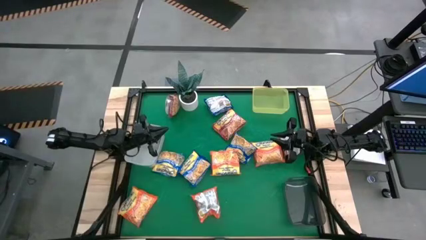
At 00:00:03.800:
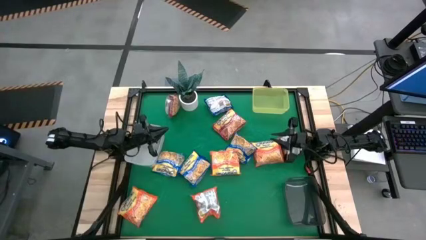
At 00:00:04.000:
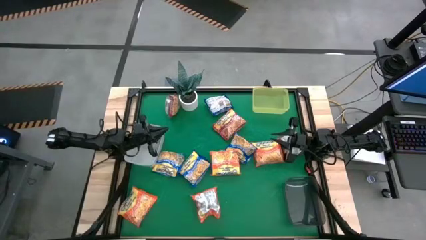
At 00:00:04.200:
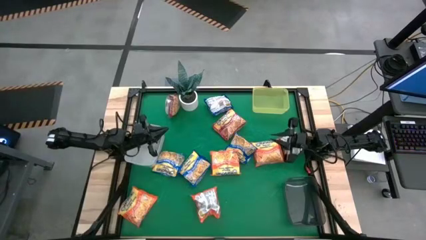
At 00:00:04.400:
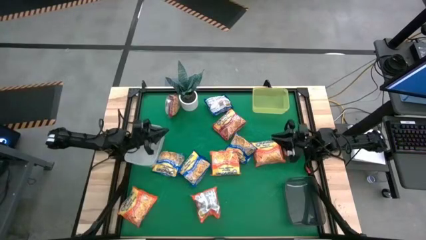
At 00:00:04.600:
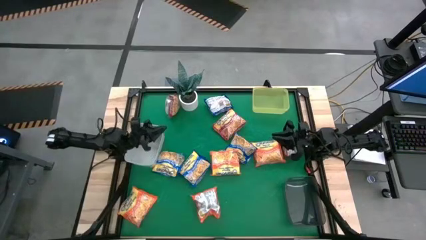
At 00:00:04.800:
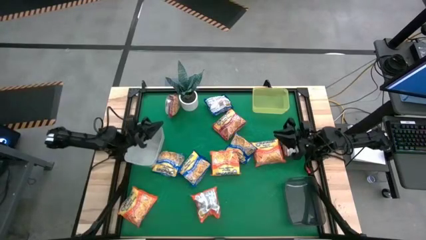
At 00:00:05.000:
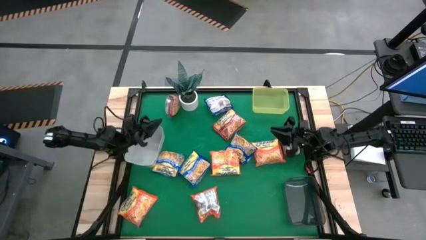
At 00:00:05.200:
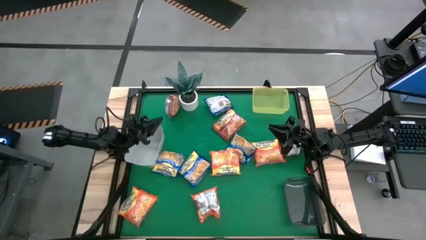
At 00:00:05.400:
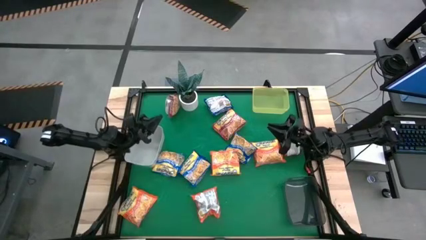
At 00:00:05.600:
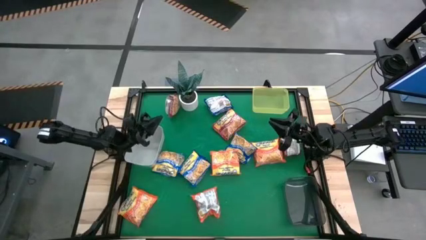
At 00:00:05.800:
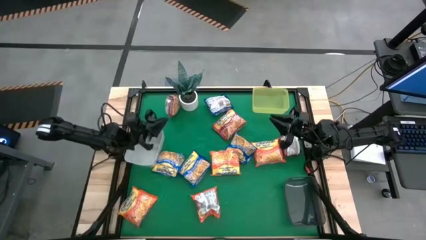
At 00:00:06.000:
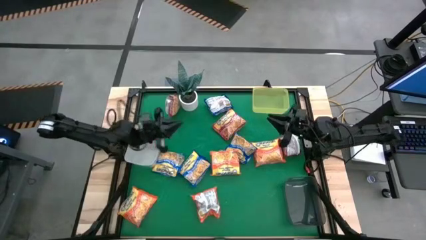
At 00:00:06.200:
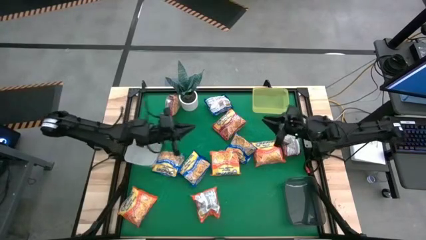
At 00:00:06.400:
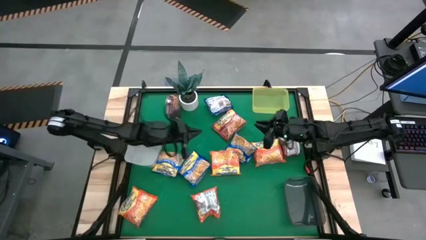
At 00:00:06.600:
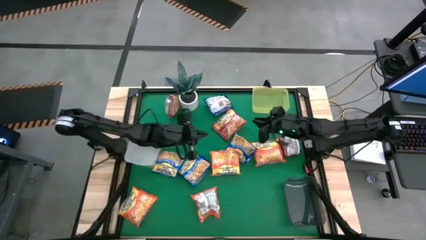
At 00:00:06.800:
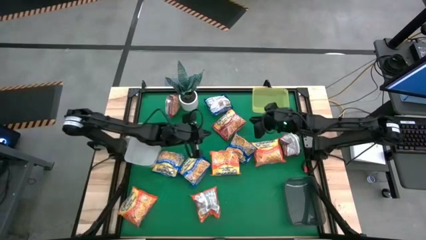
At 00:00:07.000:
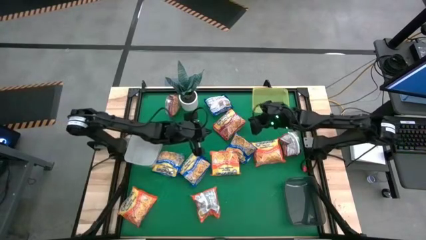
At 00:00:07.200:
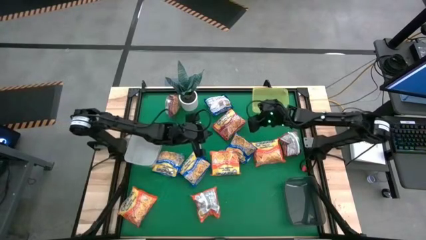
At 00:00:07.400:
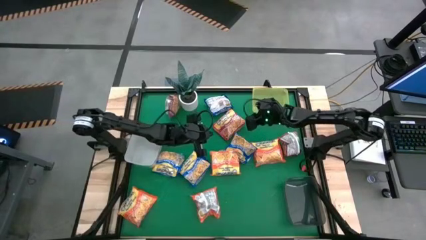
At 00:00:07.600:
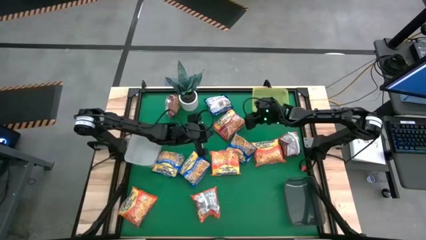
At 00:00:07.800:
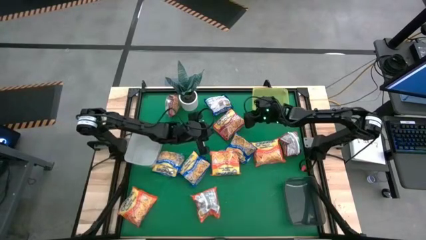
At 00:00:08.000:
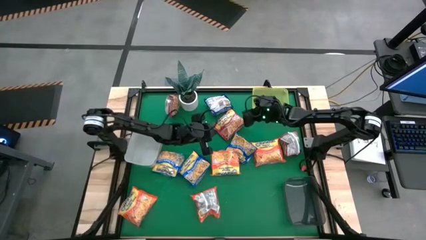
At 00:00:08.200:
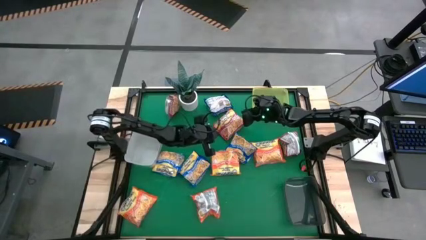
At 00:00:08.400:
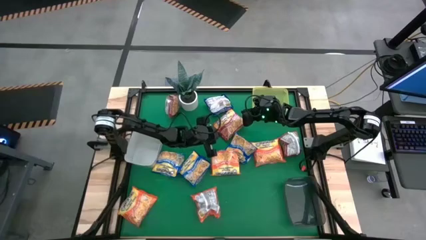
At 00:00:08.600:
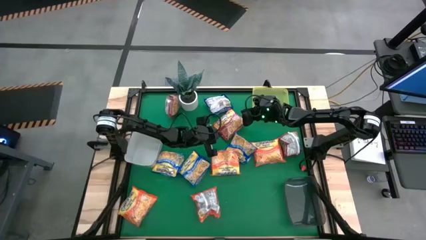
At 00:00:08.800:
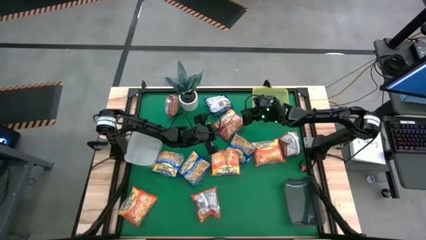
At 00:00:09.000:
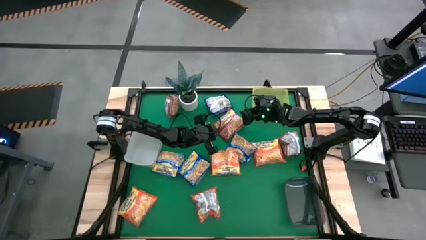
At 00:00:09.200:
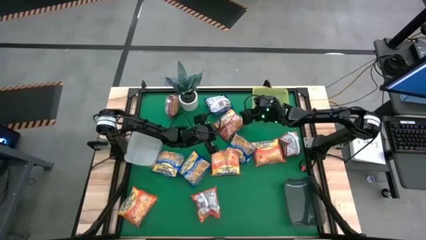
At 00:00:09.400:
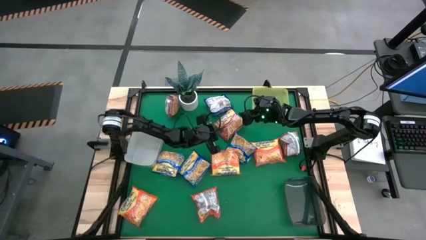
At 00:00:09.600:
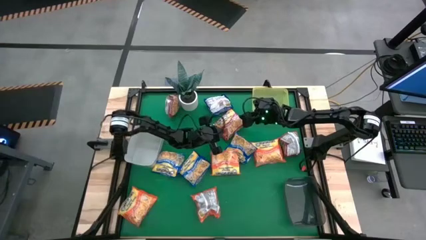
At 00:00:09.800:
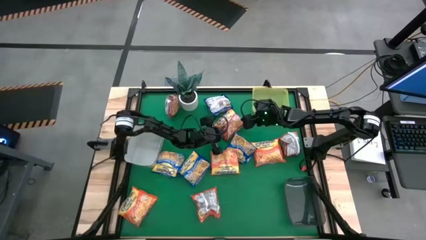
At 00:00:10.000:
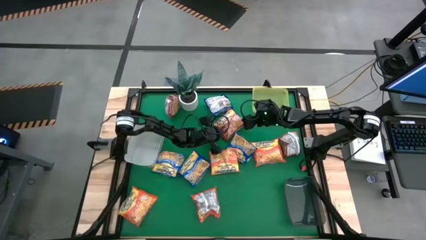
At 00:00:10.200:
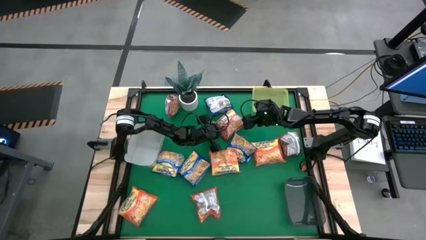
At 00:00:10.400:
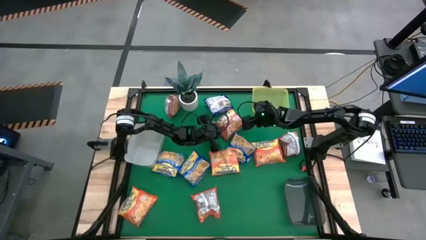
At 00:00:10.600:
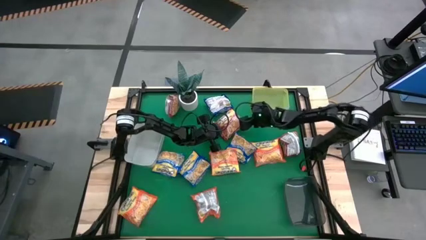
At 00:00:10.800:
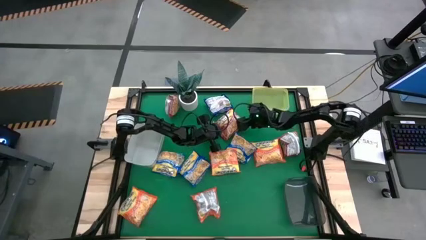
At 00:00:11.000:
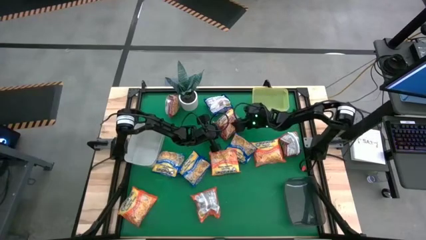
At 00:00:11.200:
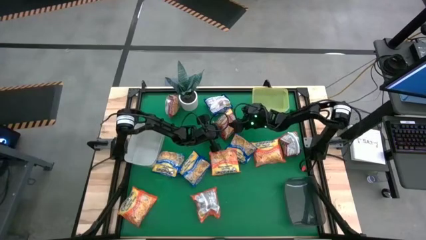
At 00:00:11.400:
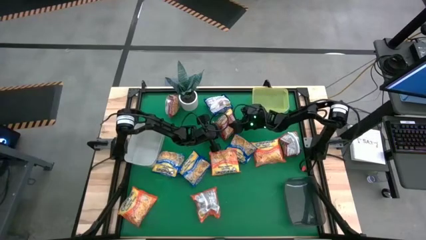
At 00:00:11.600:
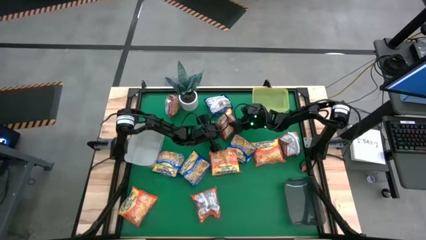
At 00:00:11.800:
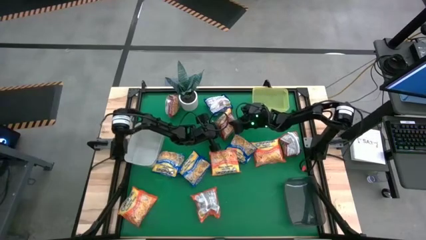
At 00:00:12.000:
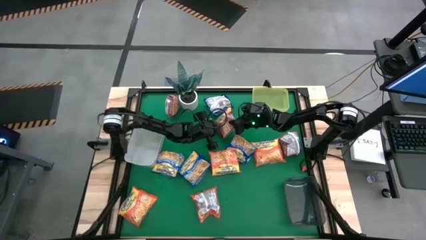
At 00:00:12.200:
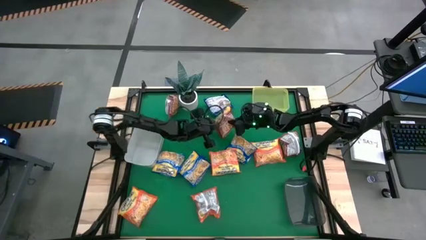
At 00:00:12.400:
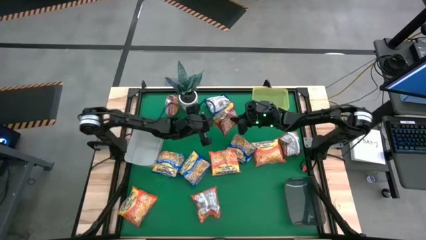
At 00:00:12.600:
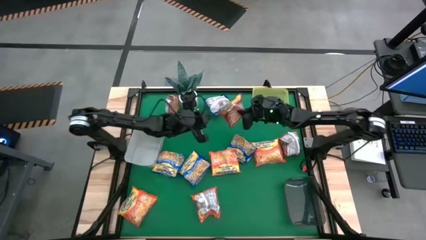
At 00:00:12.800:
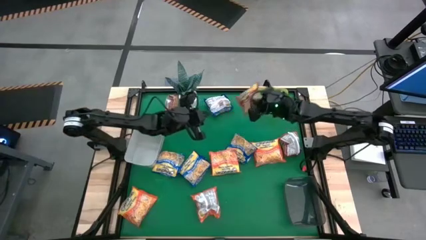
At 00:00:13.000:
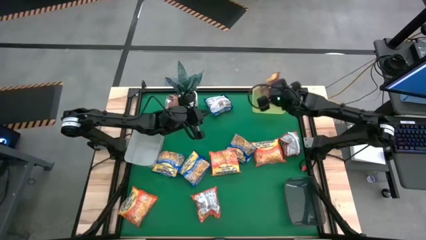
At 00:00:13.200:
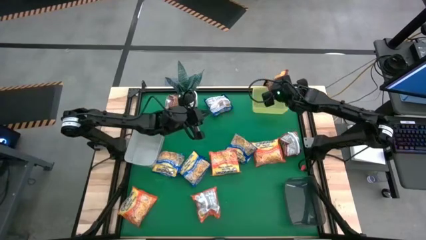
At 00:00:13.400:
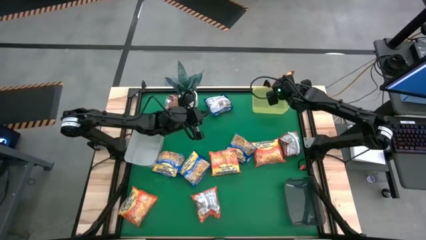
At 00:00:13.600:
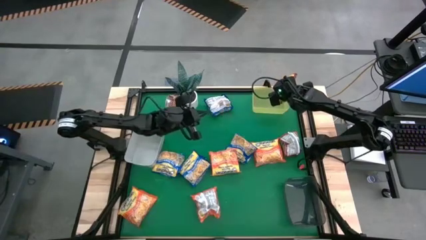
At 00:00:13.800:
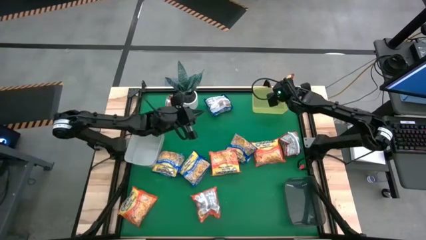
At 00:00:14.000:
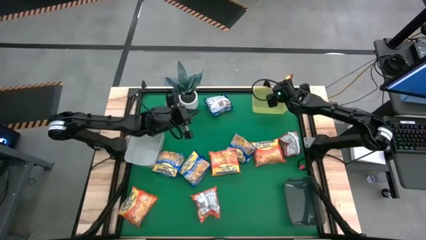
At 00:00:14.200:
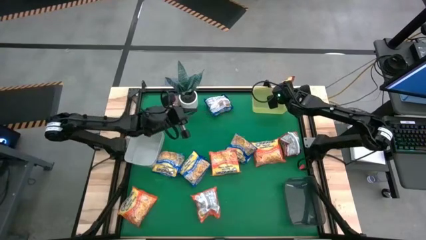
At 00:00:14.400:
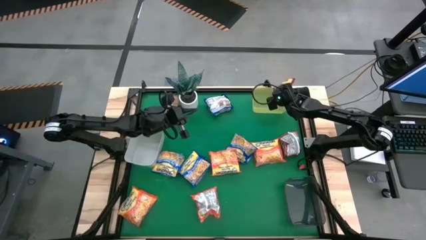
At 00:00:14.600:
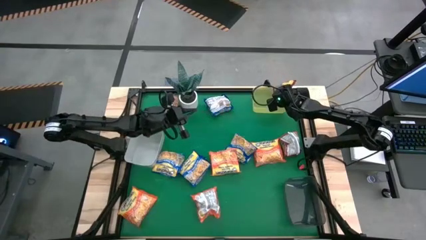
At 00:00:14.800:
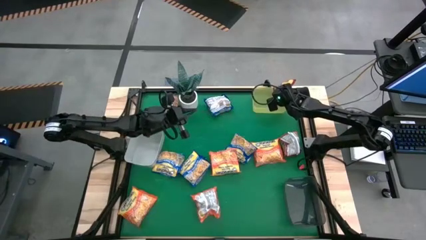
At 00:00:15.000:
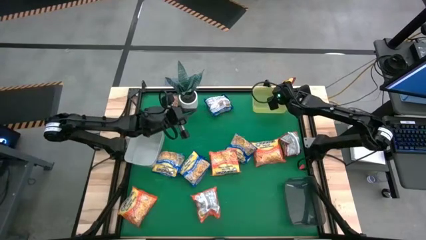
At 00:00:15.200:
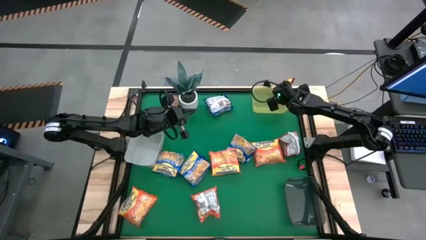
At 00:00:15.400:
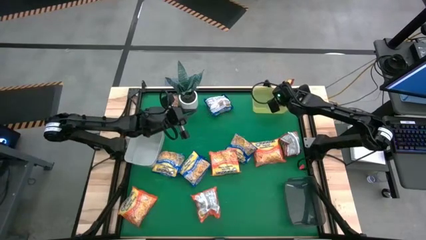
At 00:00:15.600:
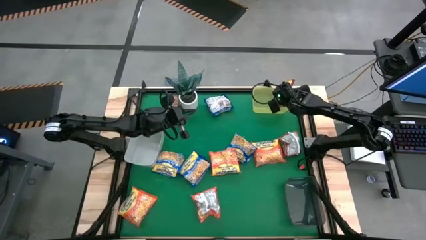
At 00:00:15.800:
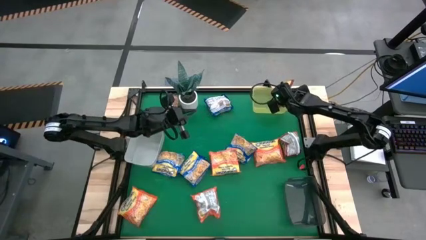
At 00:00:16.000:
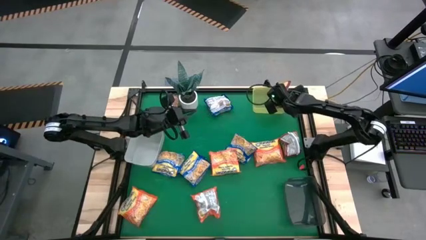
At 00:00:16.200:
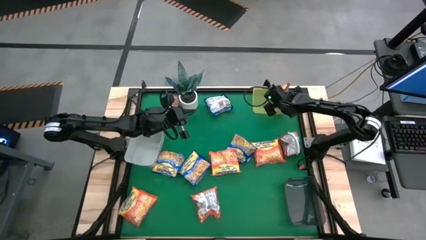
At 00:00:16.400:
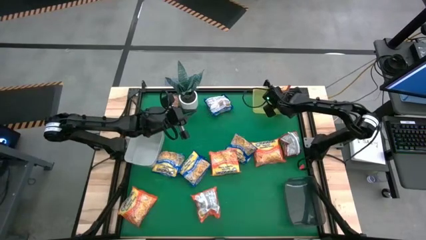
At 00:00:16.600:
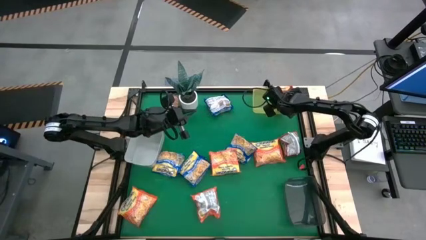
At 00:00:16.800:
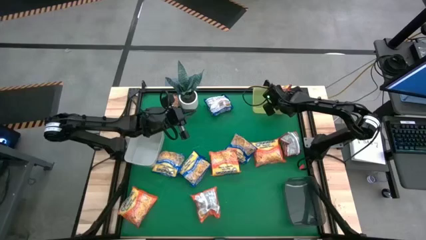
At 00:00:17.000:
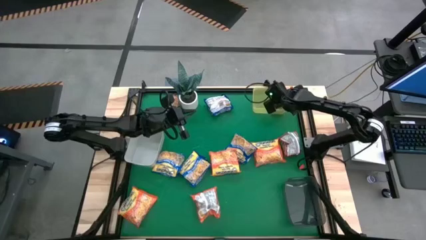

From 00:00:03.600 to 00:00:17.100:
Task: Sort Maruchan noodles
Put the red noodle pack into the yellow bin
